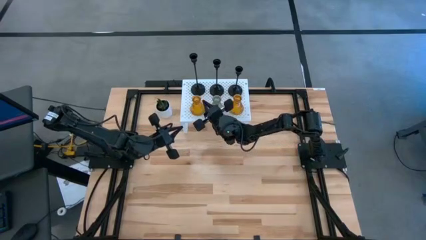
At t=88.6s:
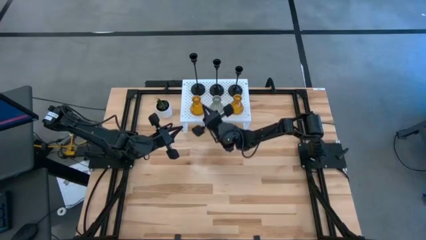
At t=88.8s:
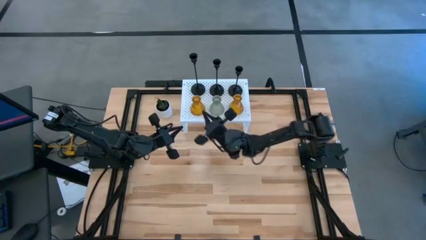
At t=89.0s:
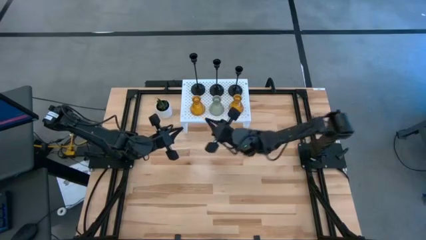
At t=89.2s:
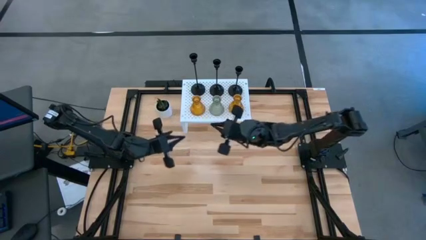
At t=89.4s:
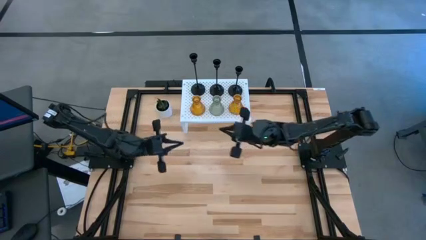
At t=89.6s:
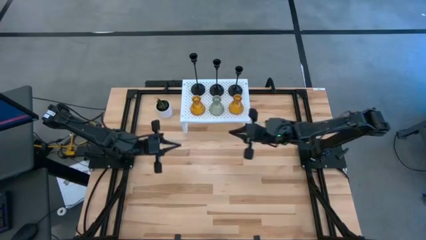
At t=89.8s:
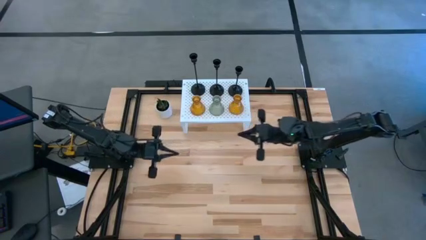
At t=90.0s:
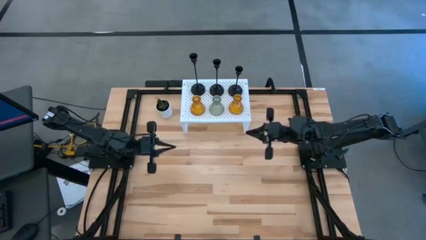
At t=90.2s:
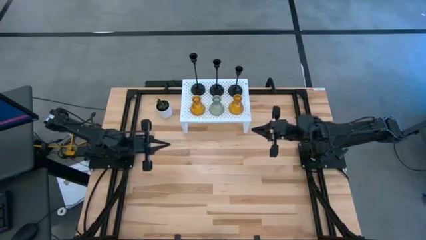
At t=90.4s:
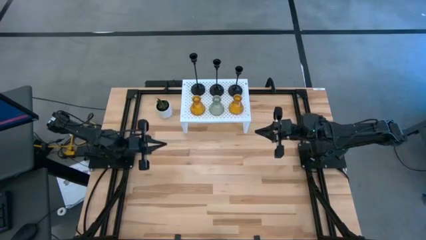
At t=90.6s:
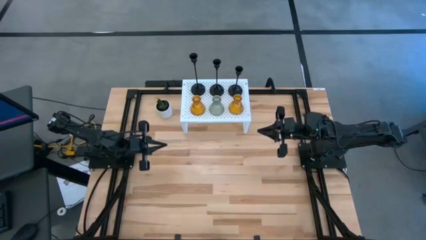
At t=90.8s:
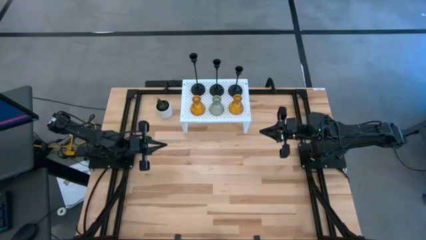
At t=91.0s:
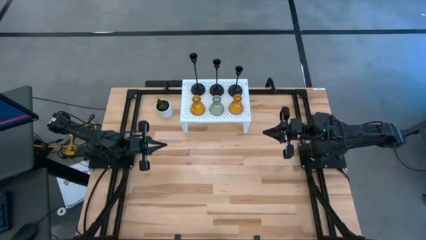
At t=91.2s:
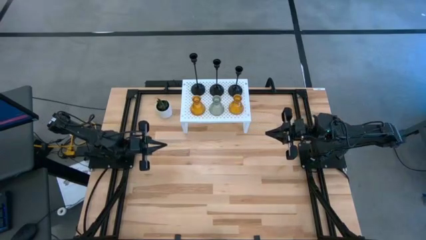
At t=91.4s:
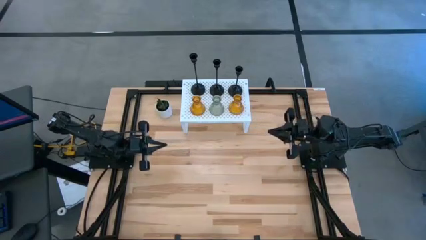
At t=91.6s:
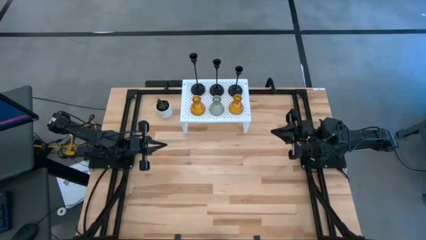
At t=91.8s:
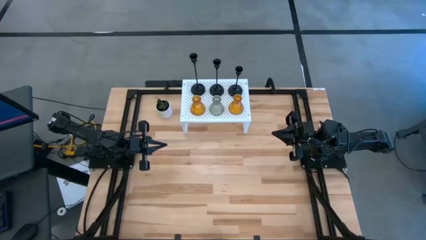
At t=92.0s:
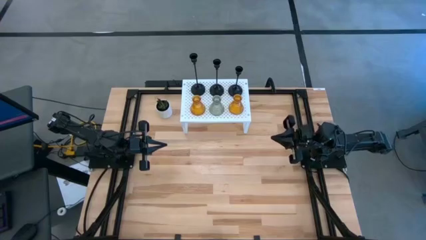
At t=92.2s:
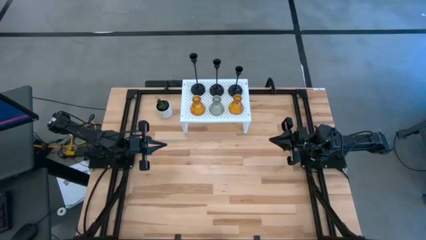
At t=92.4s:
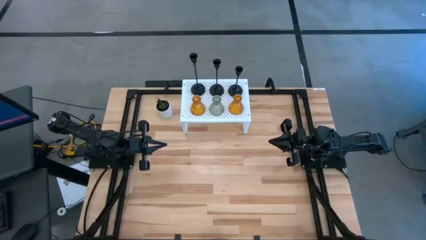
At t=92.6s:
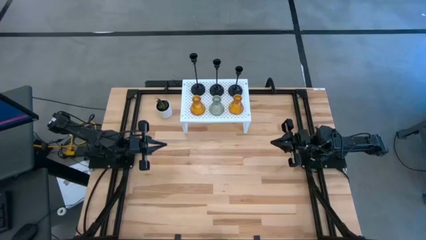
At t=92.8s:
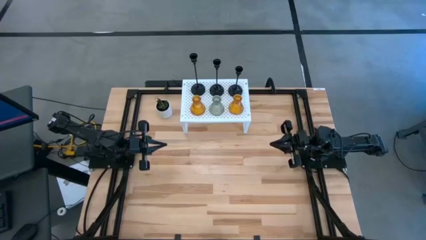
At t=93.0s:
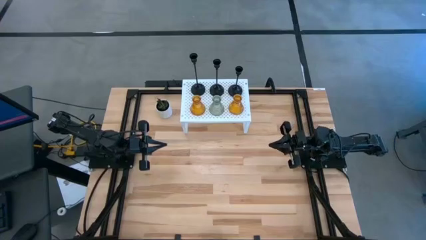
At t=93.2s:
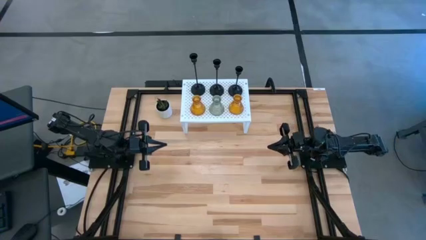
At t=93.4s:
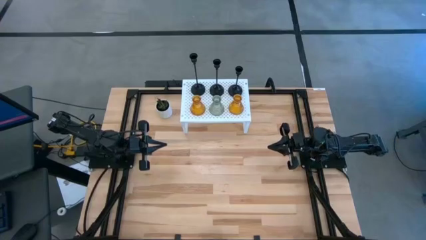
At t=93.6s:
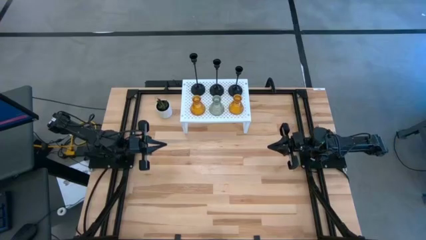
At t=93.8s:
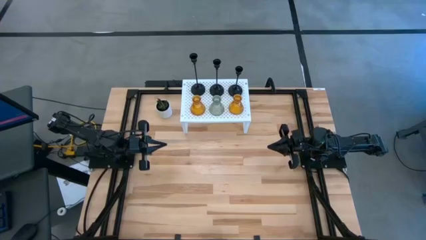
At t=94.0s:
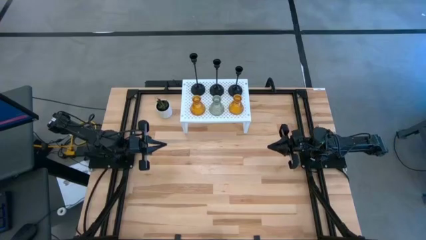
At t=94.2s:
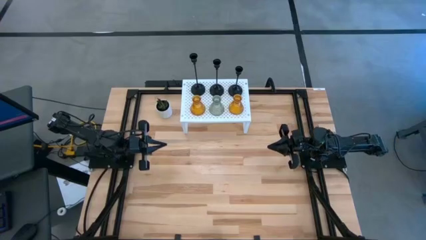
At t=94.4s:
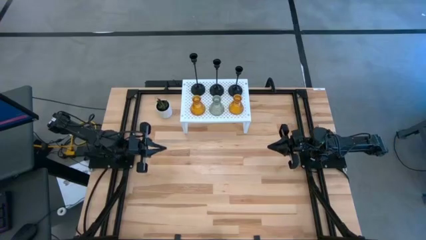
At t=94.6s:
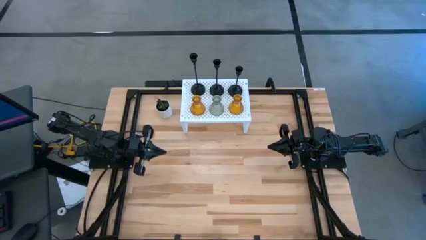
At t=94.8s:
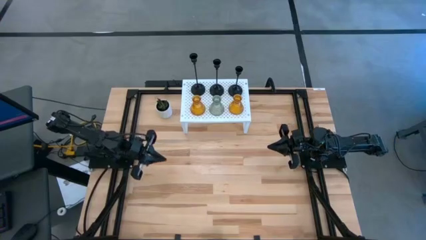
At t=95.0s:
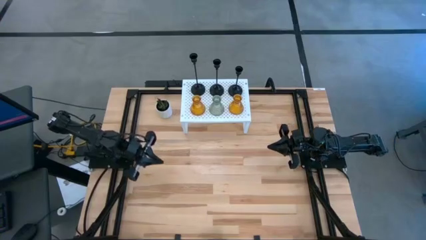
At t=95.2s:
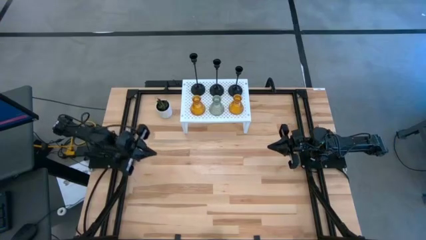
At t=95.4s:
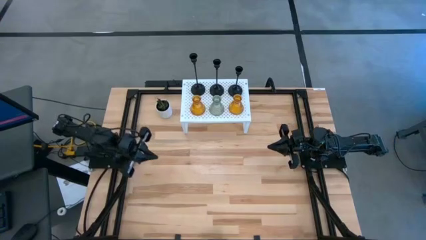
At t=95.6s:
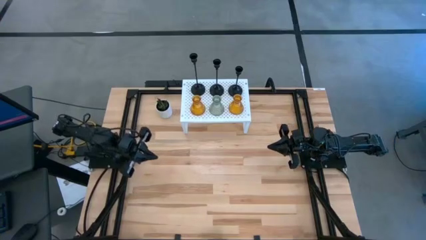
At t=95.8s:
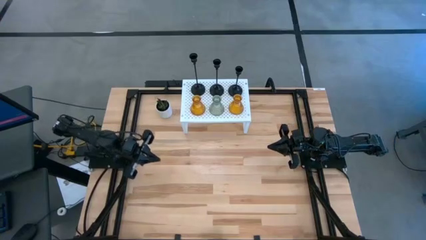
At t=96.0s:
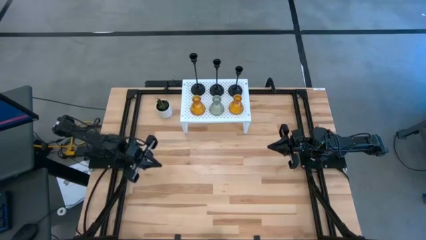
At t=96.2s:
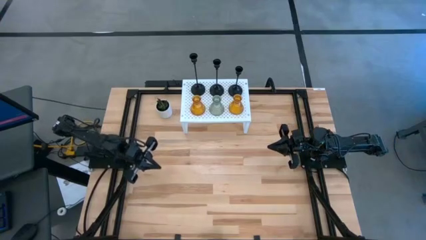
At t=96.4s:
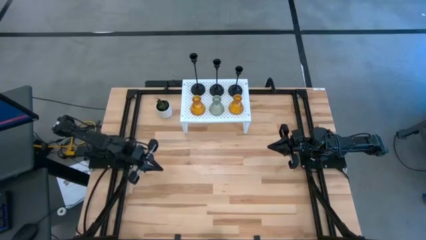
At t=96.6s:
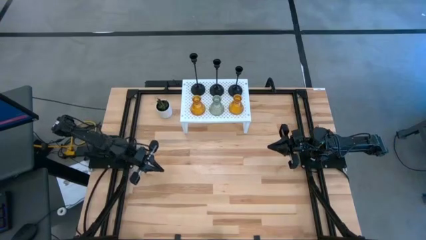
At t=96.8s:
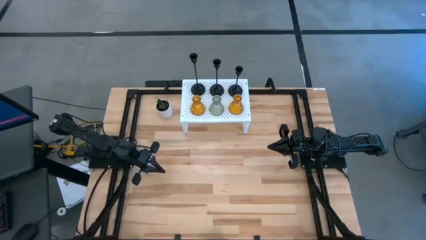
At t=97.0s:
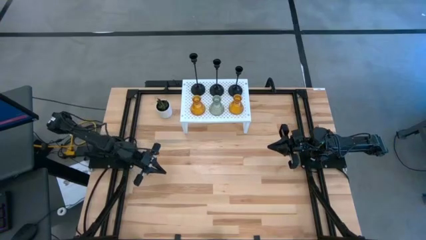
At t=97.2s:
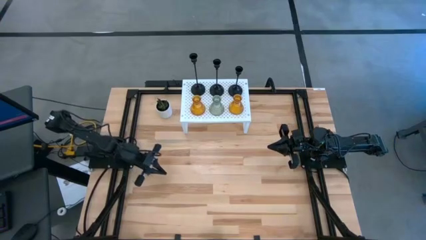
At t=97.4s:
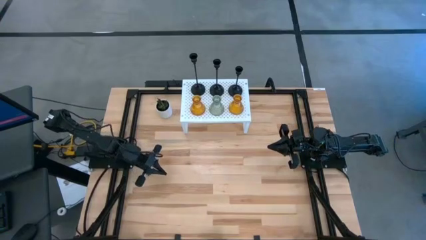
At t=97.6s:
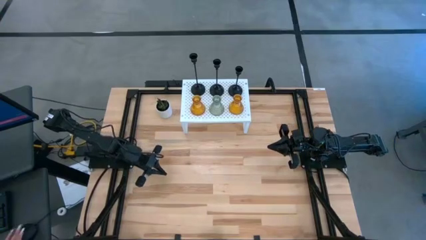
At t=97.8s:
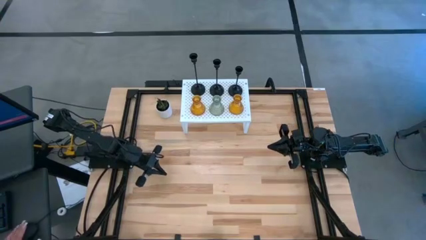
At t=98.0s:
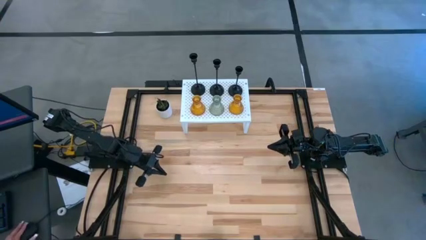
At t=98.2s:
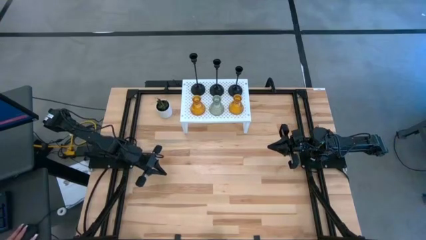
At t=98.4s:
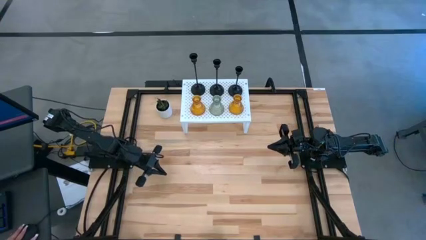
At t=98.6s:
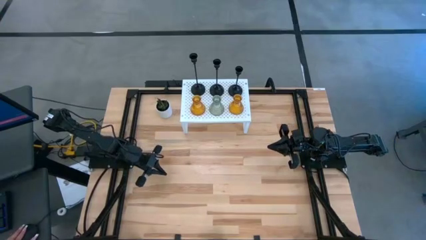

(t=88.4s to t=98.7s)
Task: Pick & Place candle stick holders
Return to Home Position
